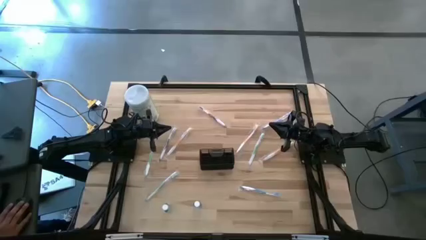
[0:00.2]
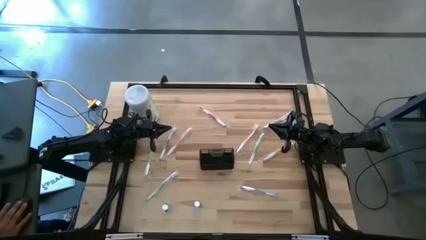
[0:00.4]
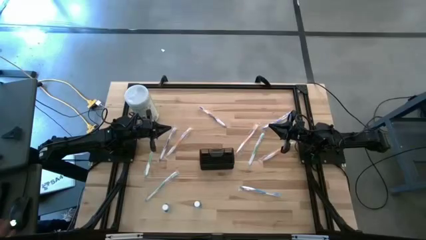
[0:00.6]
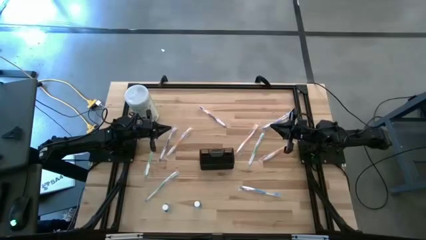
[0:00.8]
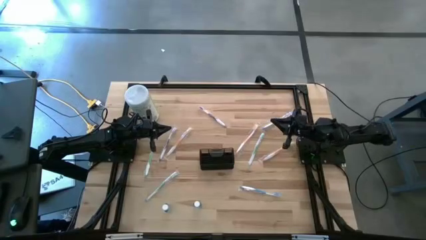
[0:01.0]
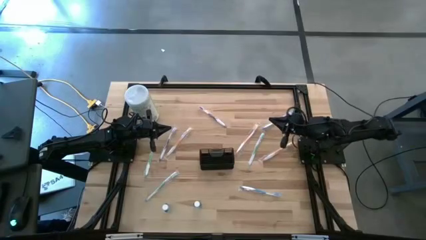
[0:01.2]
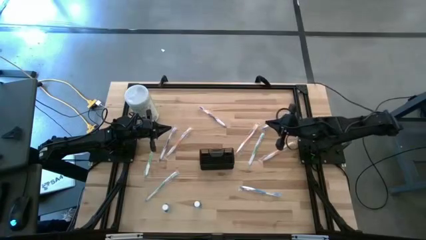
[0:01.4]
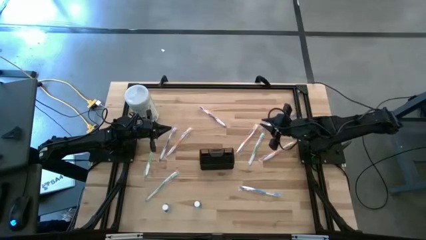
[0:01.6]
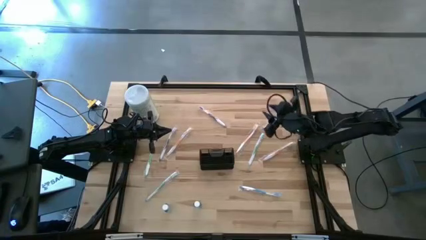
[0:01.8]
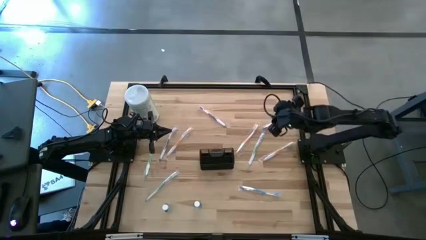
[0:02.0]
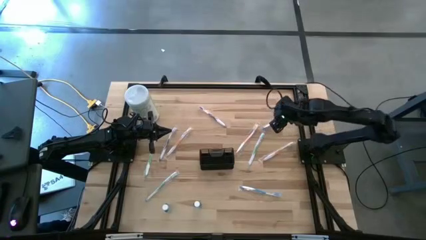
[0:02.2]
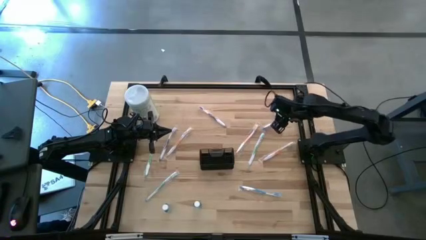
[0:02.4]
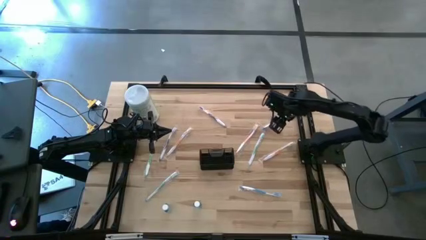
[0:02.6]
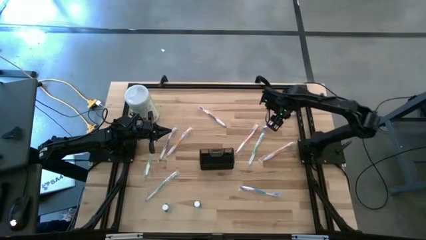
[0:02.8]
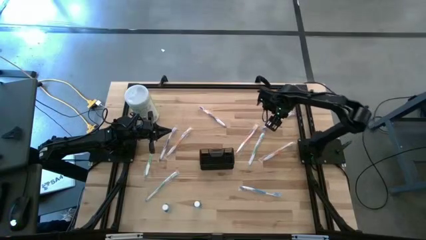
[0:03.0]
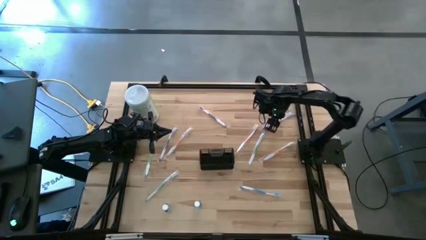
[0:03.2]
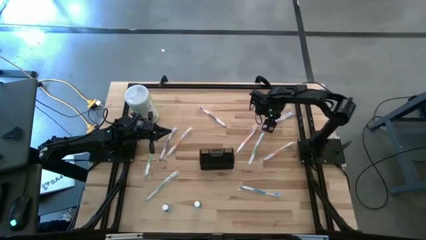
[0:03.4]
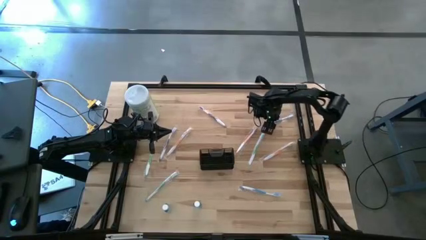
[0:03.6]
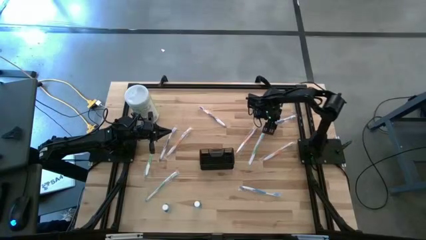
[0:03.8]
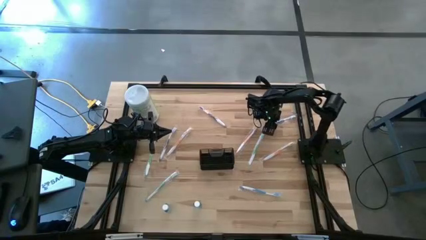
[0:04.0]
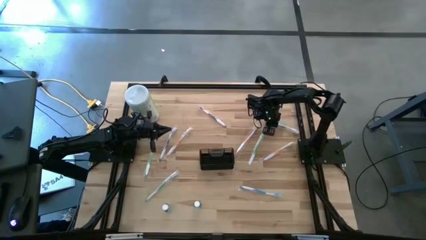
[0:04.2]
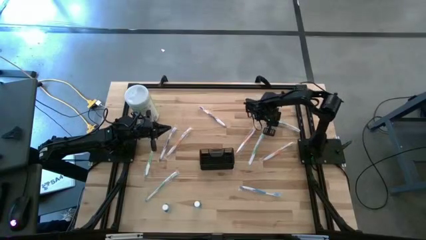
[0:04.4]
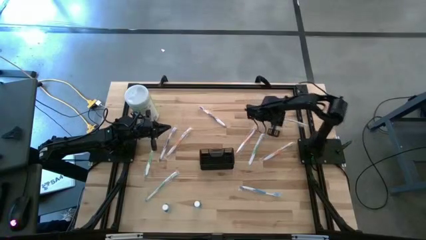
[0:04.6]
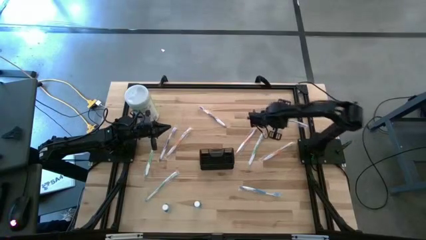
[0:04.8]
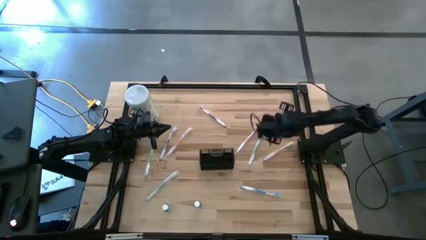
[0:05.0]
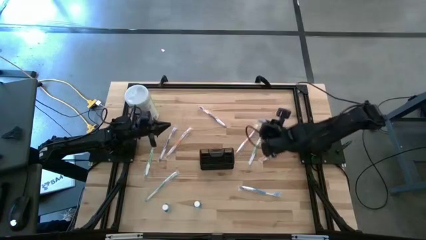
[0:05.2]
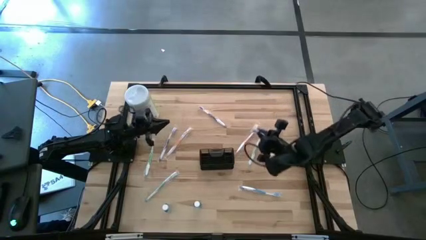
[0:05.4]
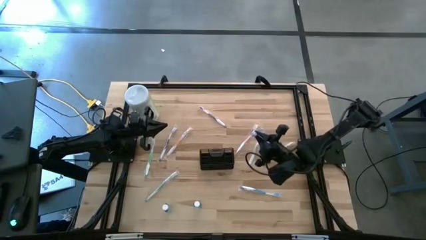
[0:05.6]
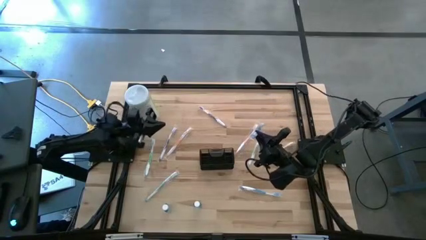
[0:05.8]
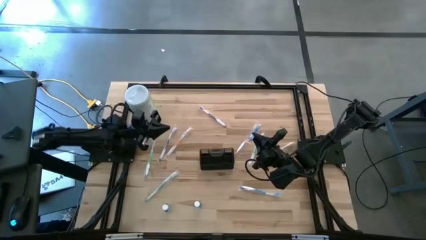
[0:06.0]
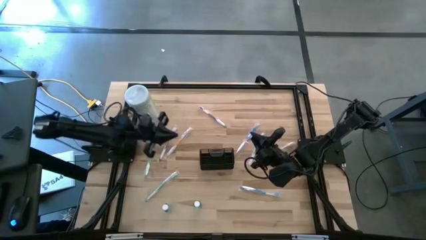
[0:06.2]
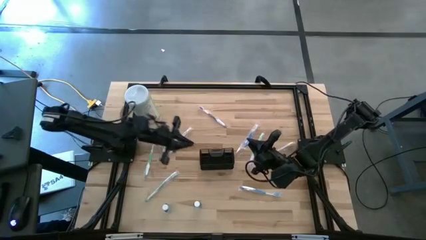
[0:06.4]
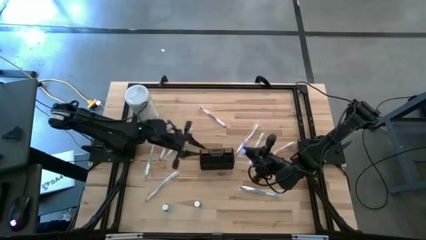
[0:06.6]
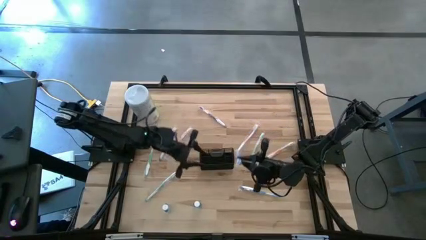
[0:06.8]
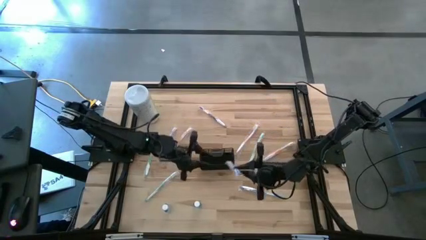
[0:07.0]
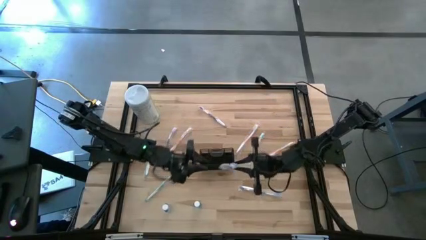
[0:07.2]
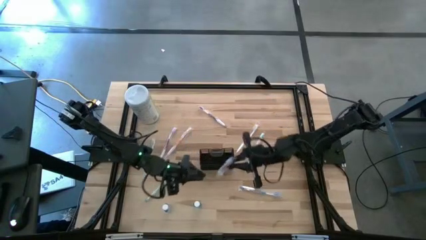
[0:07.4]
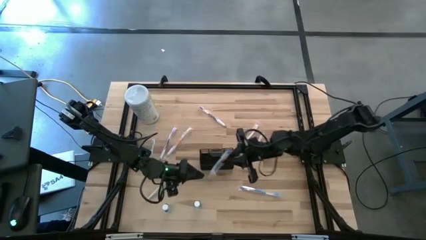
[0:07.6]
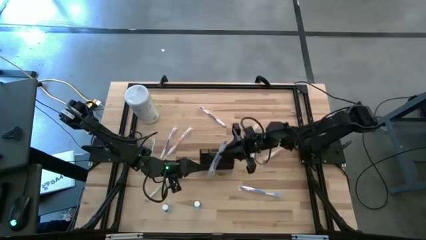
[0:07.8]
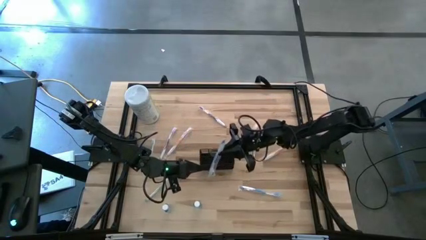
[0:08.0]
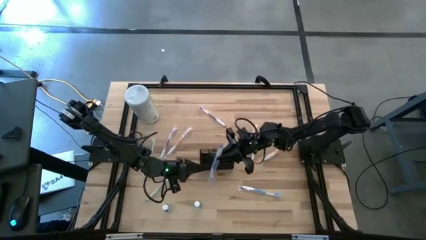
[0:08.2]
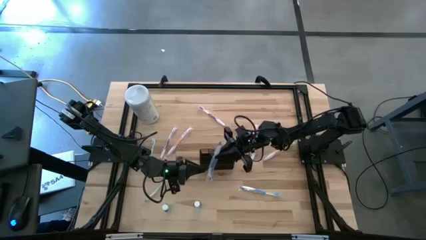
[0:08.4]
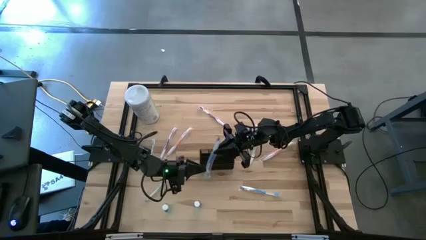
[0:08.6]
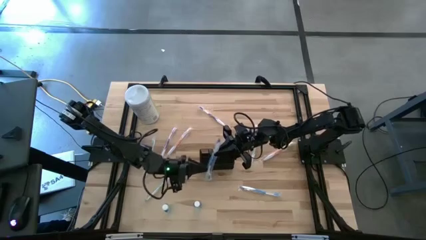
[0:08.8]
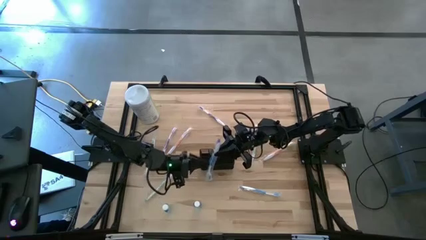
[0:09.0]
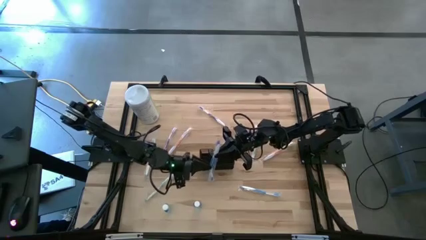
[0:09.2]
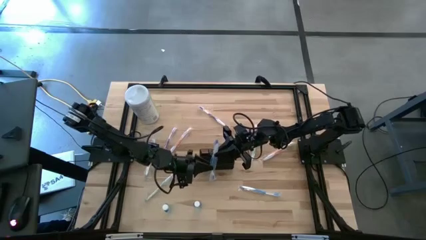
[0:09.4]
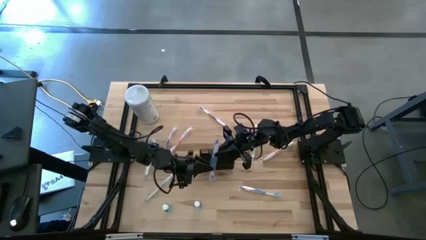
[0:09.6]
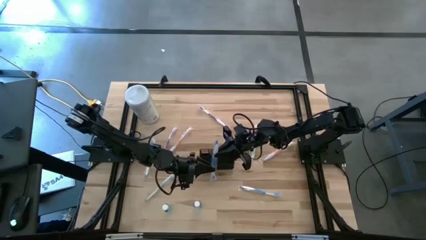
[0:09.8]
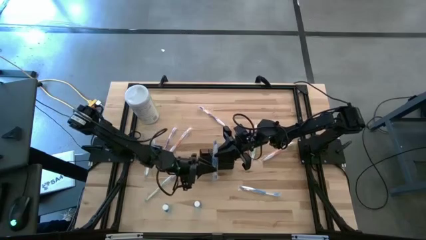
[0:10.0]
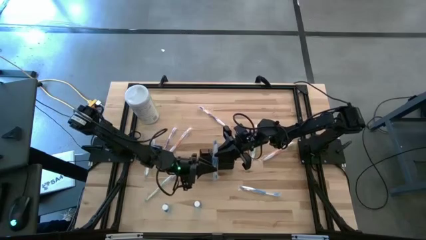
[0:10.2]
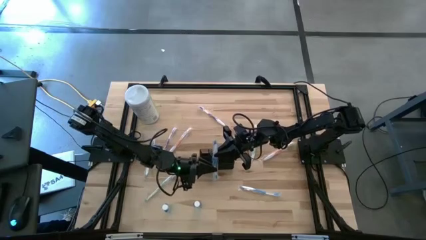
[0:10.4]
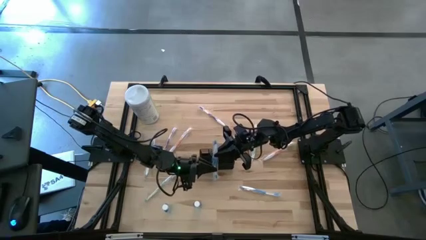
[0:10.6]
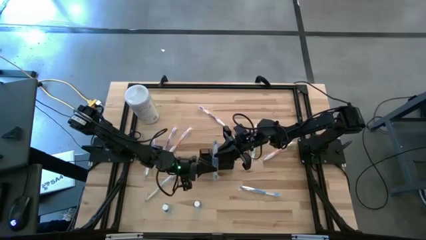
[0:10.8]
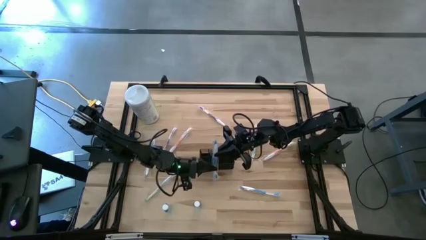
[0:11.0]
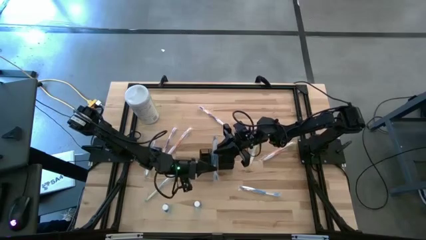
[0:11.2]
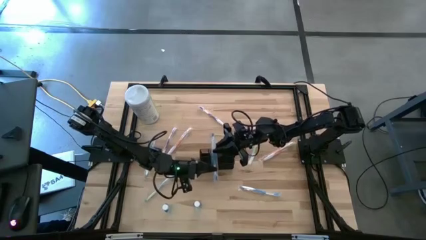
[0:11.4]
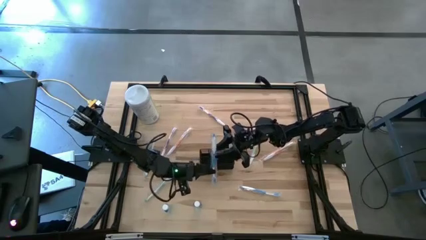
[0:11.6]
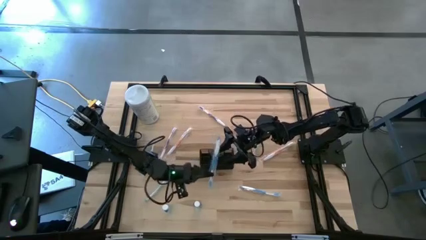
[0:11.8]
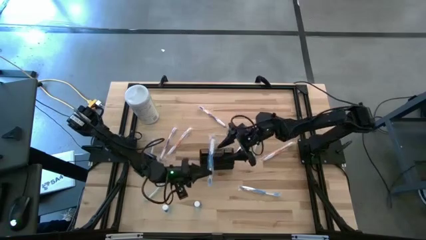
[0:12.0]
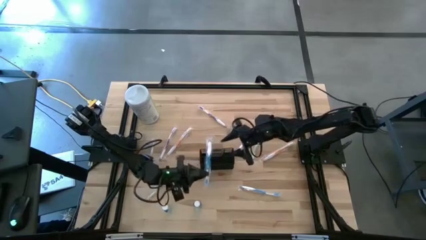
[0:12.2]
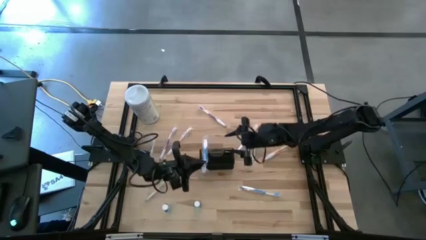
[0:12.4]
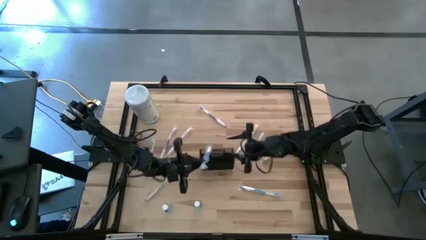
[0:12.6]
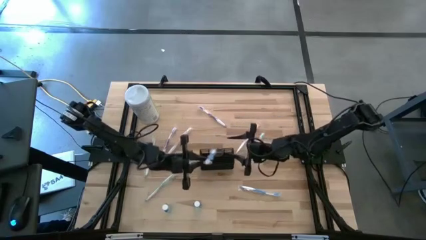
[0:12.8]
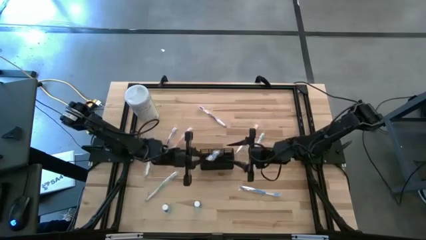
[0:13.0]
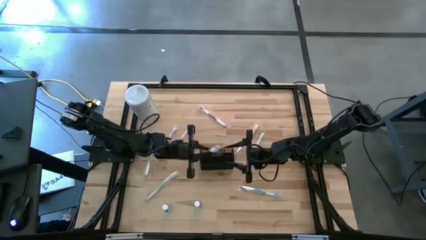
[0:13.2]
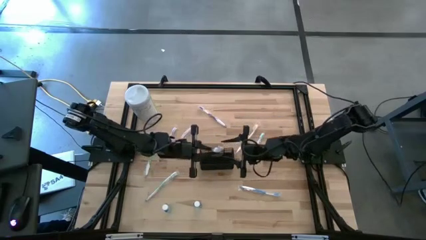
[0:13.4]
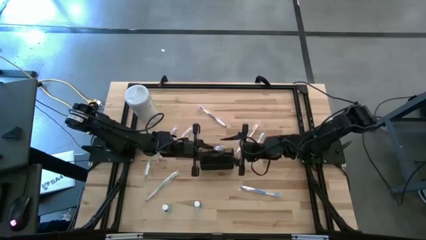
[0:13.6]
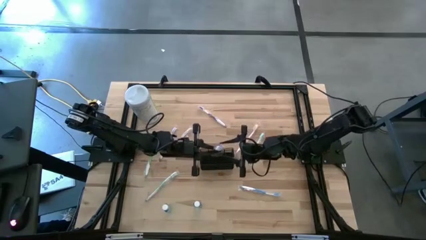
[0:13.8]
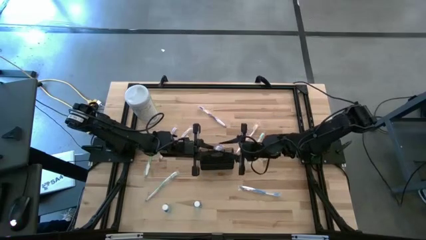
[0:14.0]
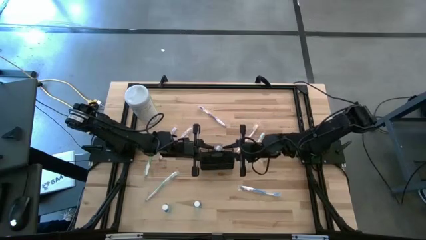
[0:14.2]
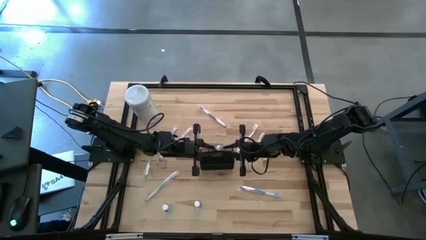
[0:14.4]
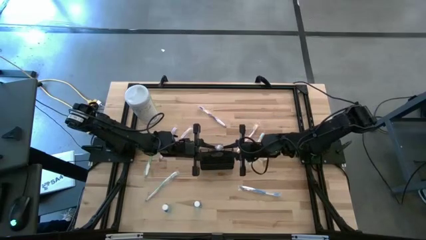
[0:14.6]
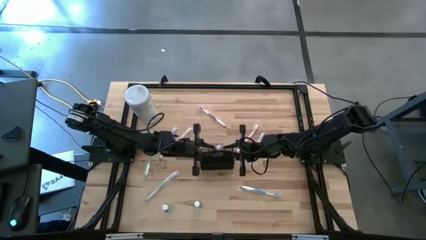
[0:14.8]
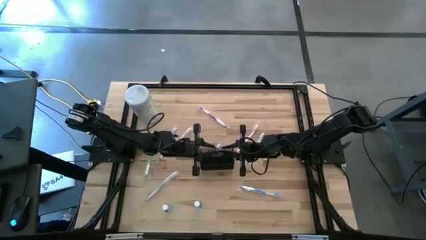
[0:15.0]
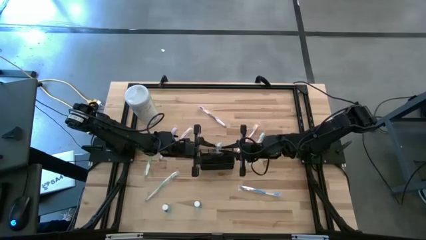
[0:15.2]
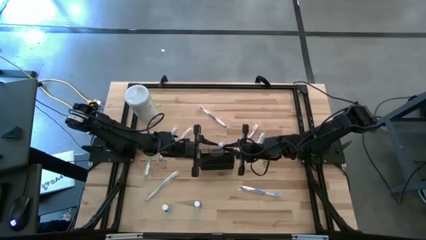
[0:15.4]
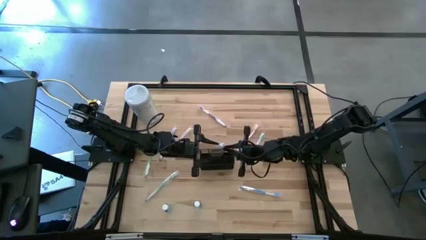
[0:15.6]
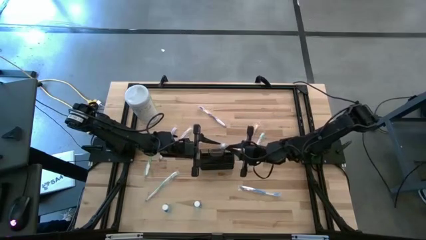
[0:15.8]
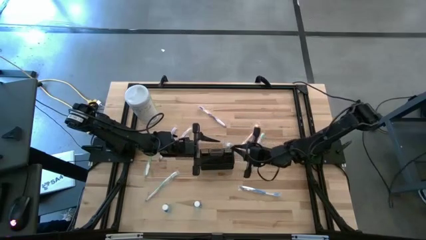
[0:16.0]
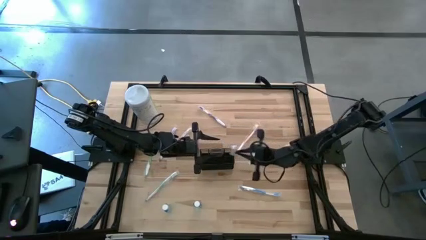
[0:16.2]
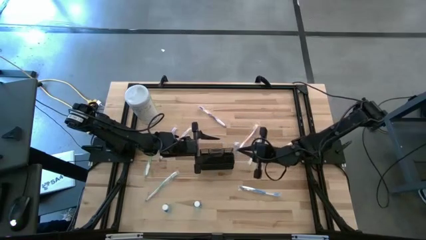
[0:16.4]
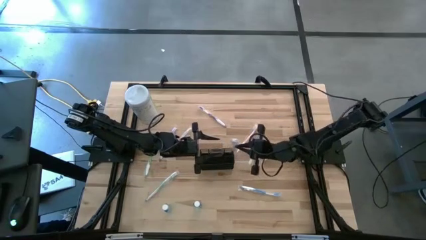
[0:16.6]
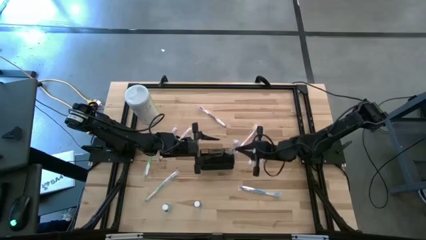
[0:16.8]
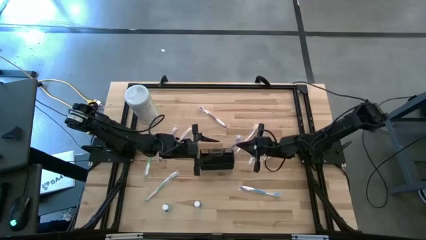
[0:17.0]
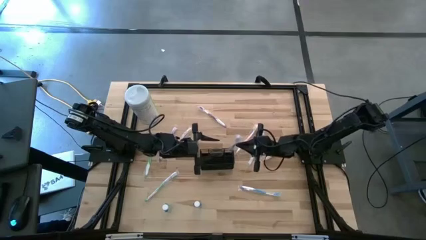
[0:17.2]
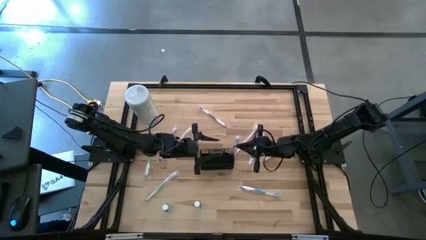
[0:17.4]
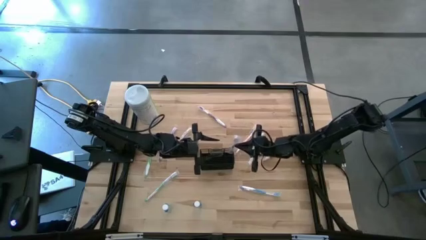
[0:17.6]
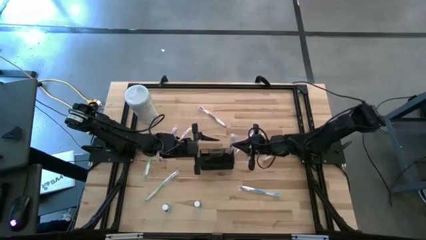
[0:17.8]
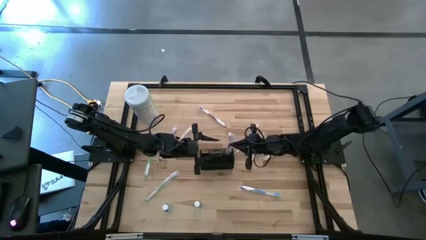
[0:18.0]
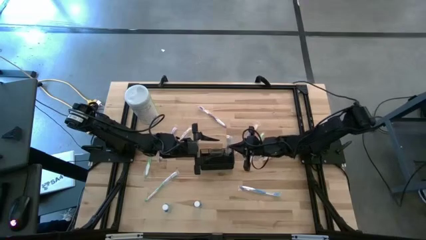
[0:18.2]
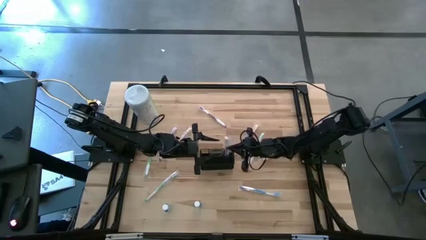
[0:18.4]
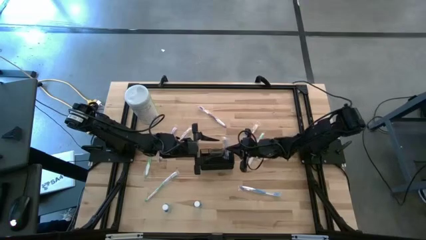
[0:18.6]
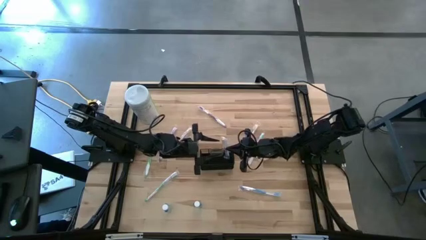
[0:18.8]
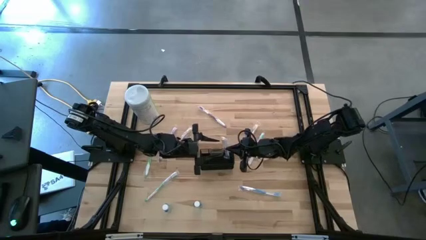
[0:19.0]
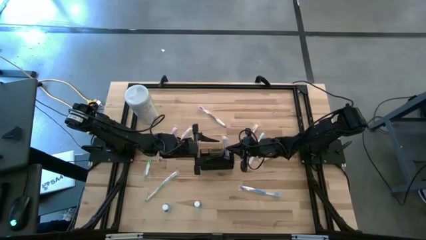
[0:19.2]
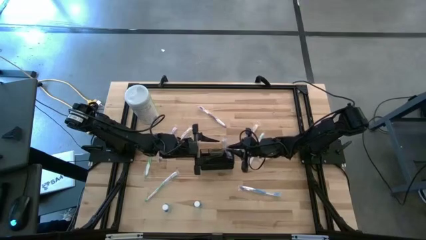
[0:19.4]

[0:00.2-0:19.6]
Task: Pick & Place toothbrushing station
Put the top blue toothbrush into the black wire organizer
